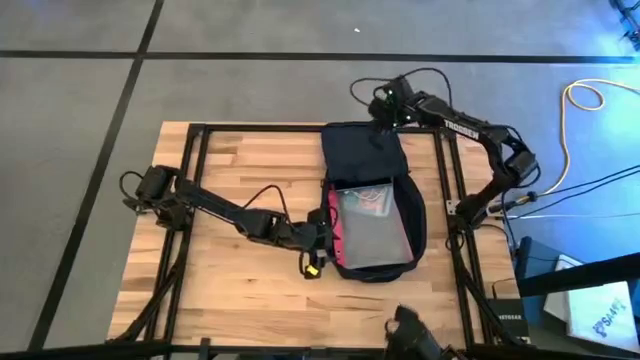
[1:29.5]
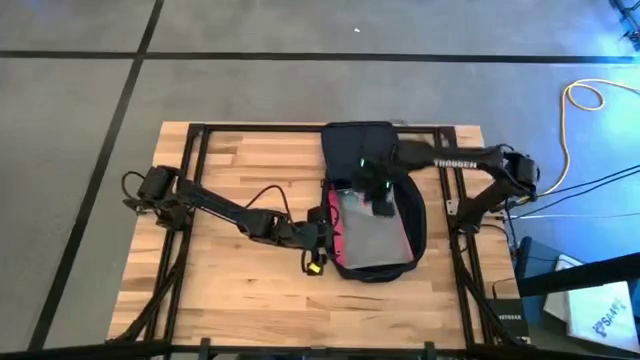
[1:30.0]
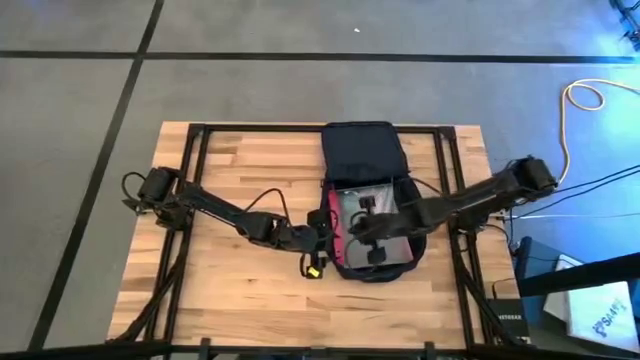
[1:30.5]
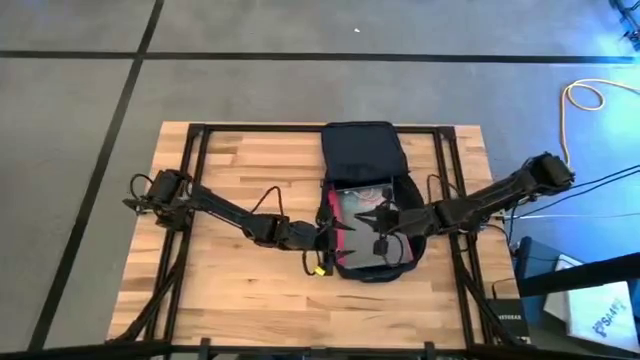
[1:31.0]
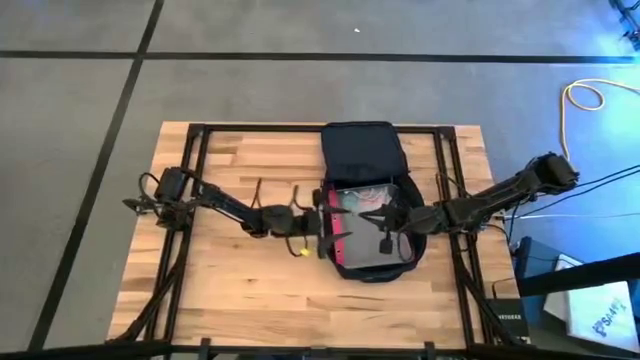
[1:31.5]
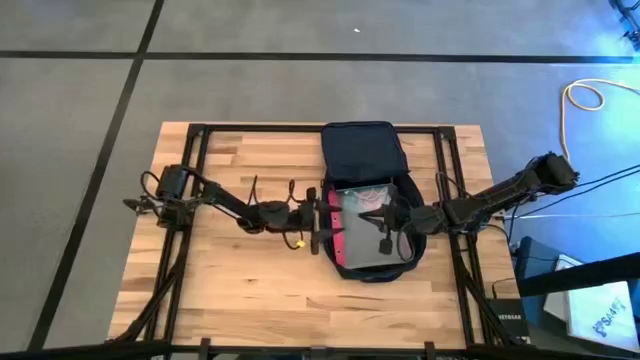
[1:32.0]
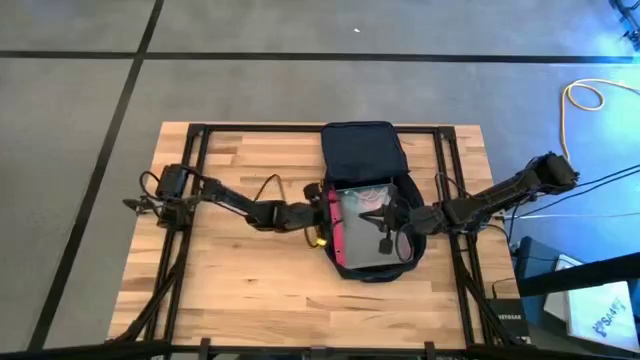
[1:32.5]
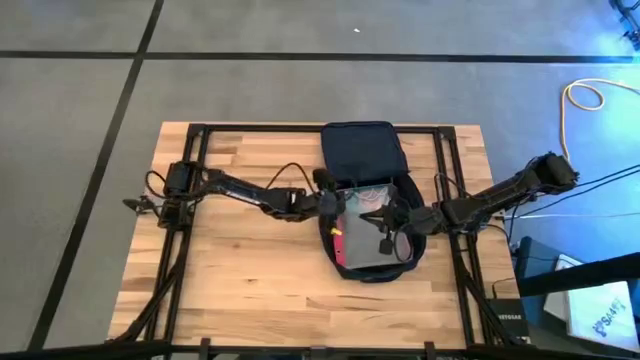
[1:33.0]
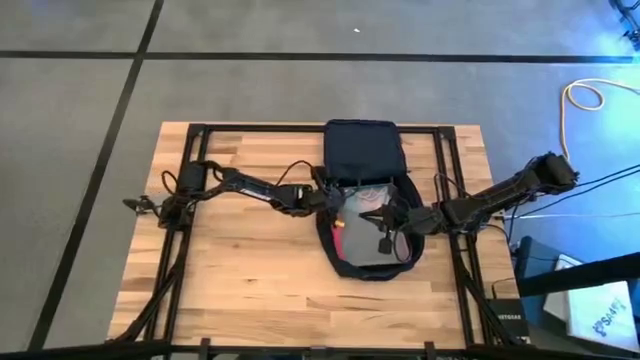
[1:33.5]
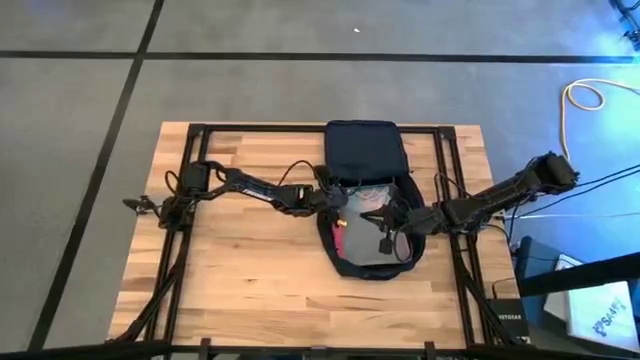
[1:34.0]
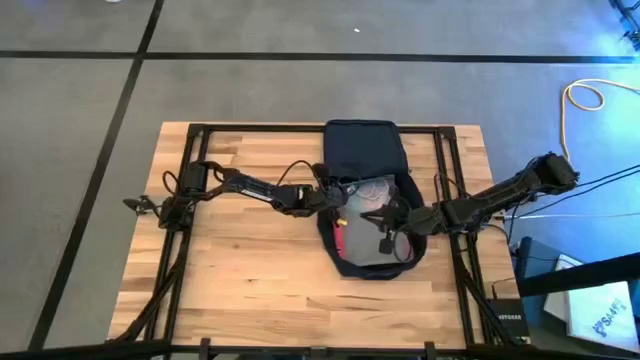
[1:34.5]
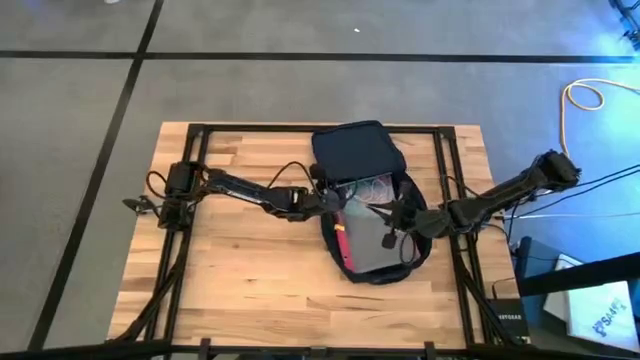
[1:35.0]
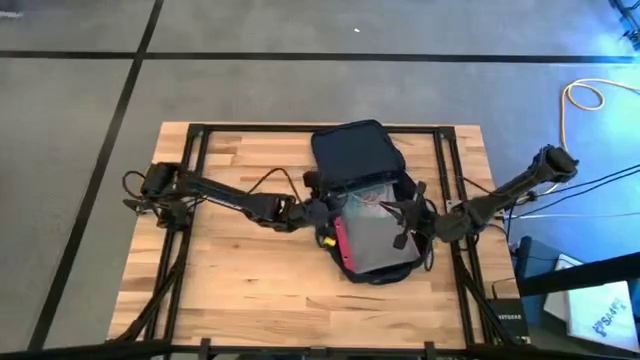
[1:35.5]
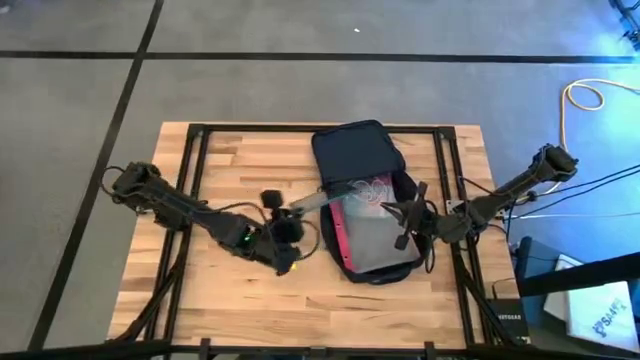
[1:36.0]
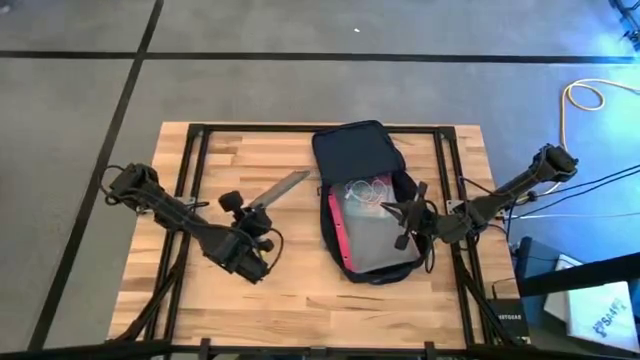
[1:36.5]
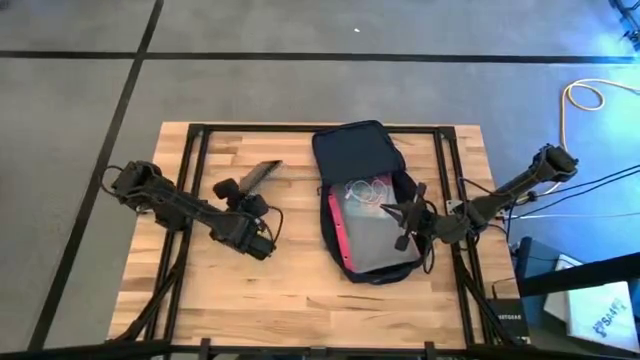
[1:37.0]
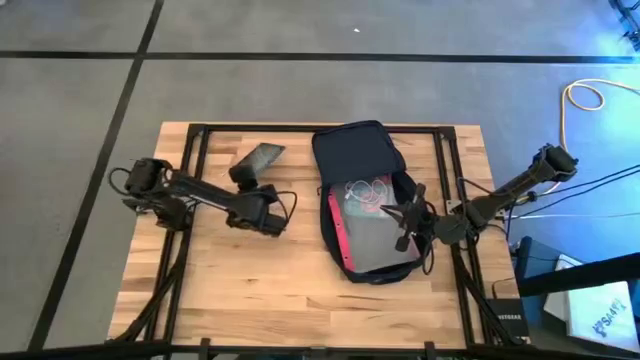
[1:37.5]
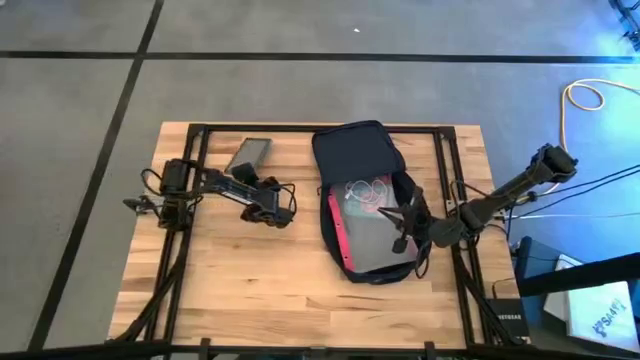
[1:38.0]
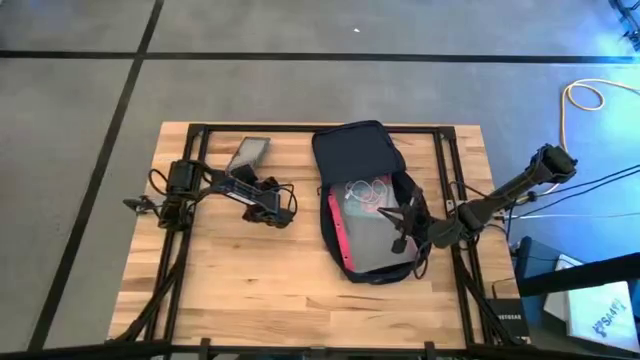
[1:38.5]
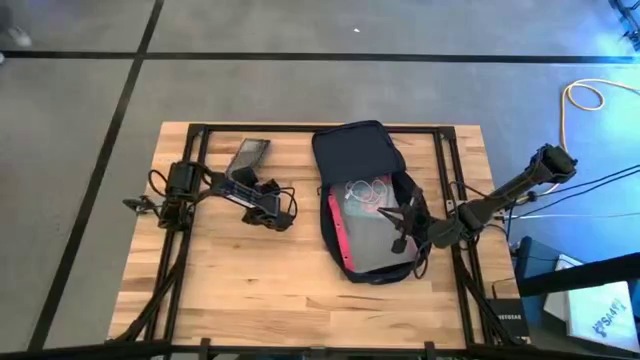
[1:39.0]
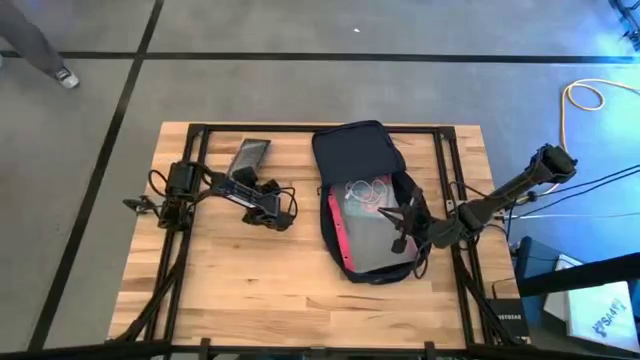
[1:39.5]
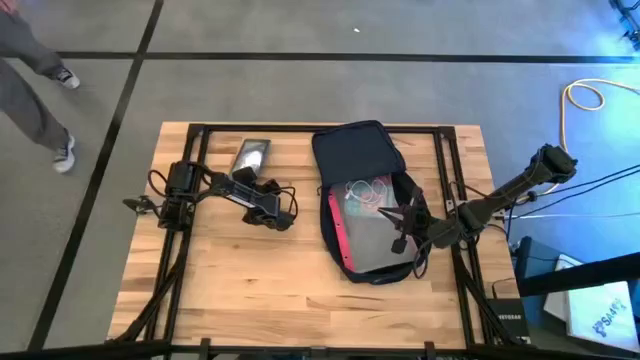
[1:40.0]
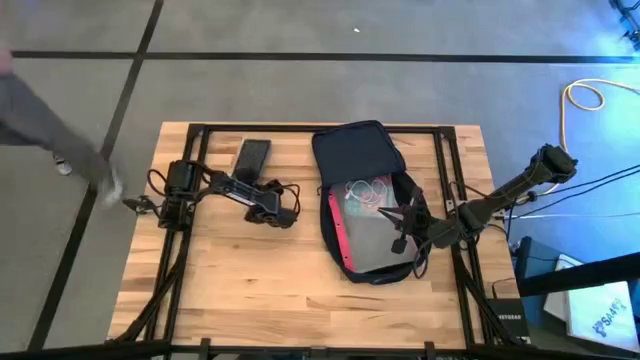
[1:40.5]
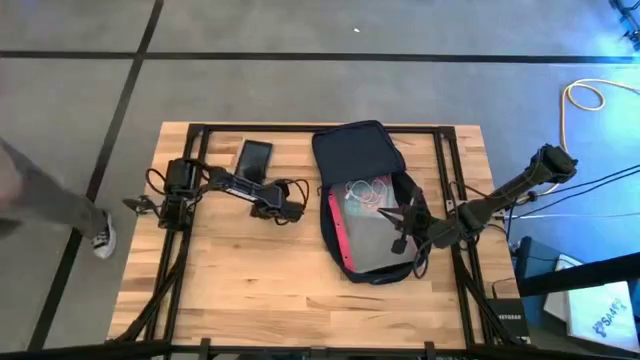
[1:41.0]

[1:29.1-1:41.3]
Task: Unpack backpack
Remove the blue tablet from the blue backpack

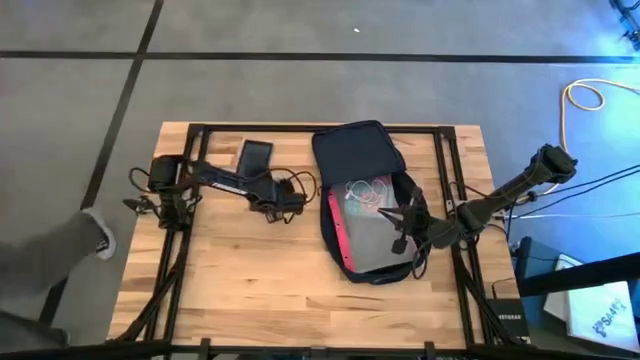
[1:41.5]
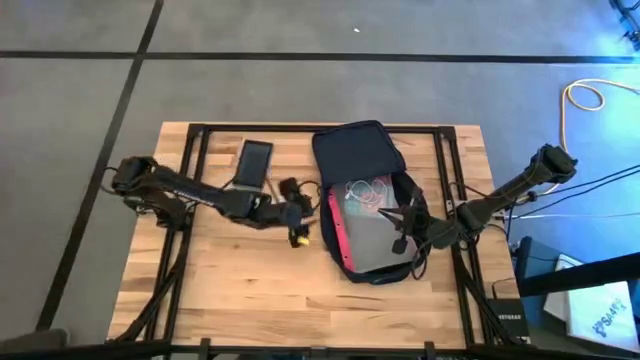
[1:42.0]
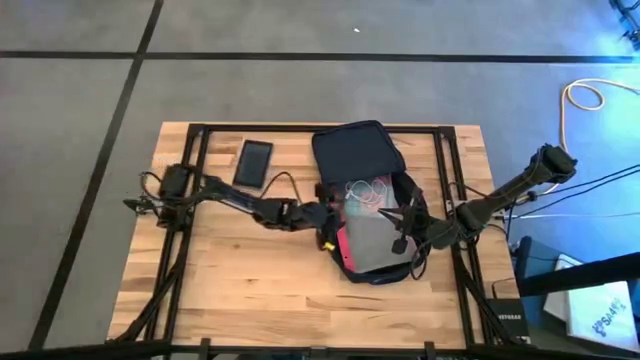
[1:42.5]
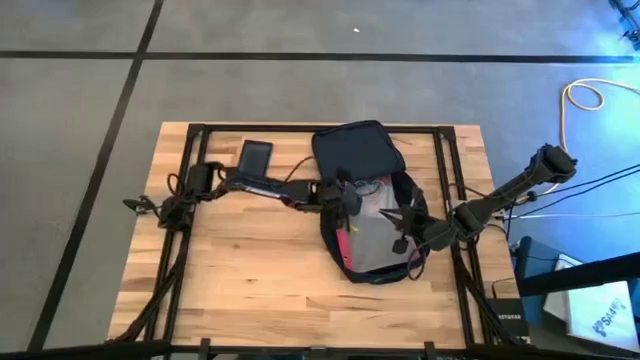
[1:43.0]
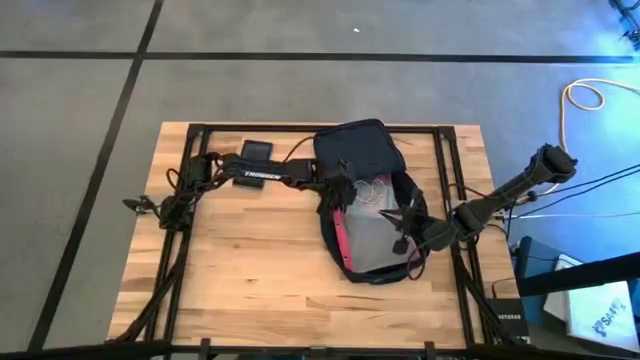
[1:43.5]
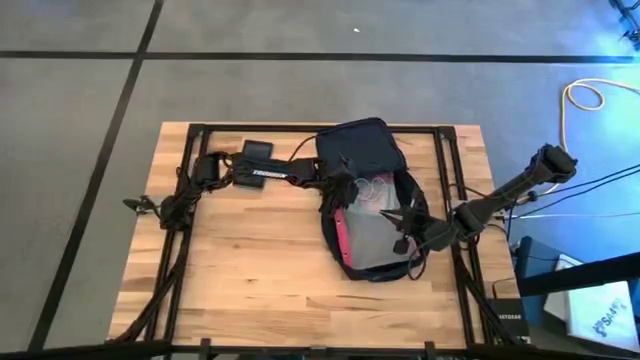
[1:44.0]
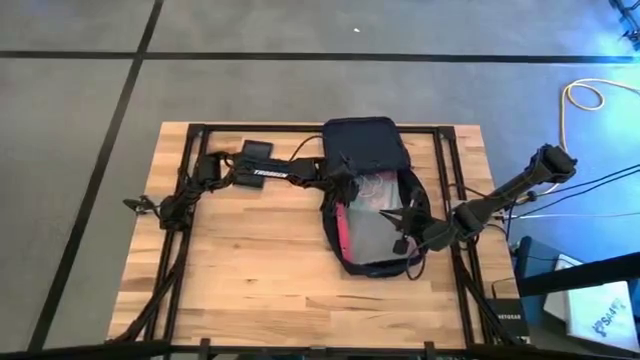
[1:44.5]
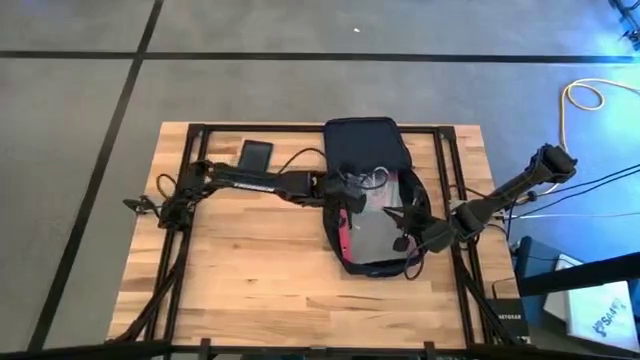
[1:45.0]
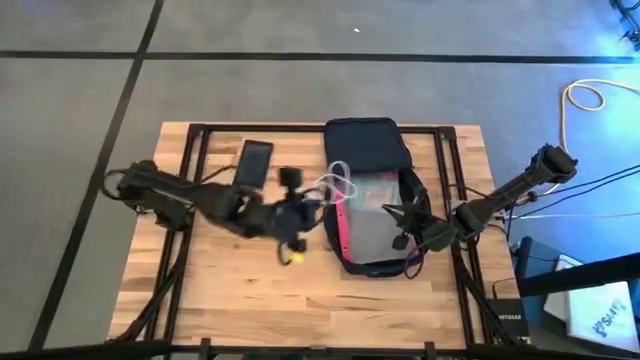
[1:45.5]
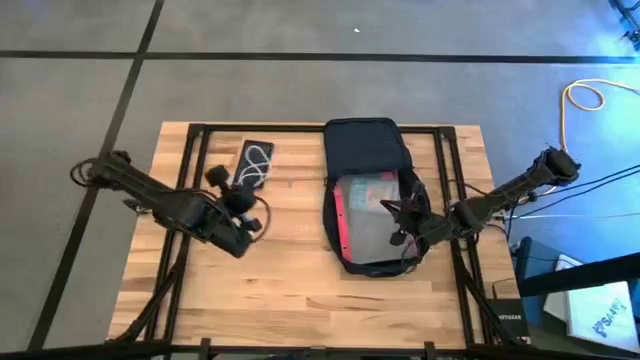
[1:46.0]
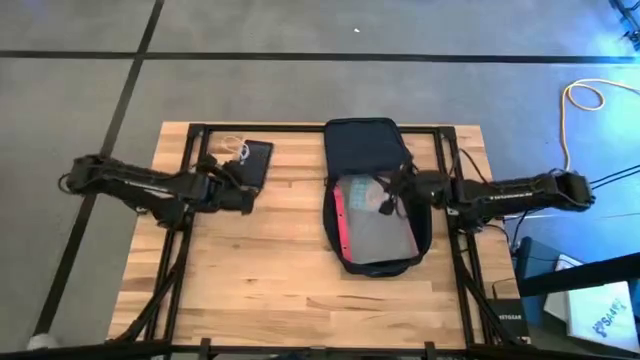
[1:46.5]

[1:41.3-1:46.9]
Remove the white charger cable from the blue backpack

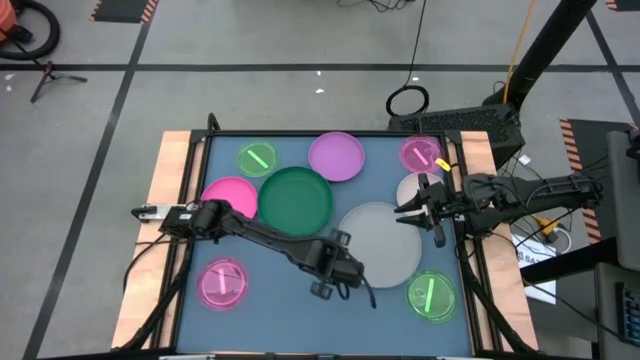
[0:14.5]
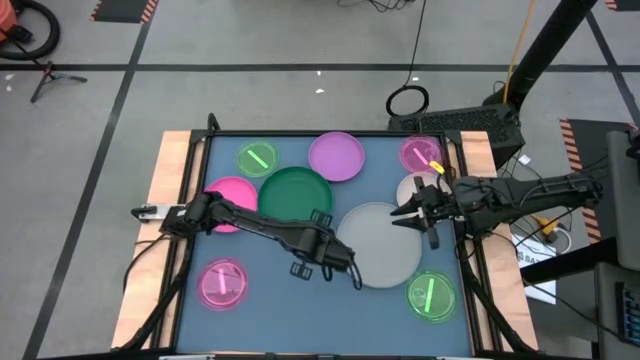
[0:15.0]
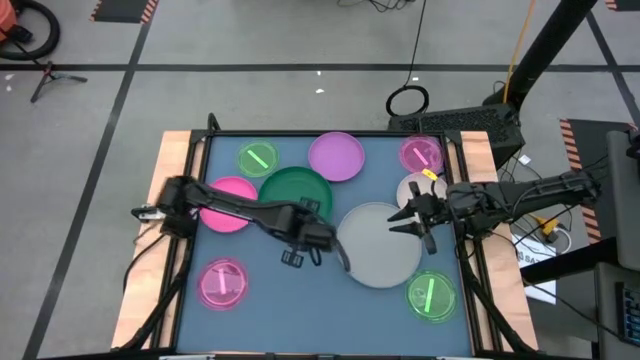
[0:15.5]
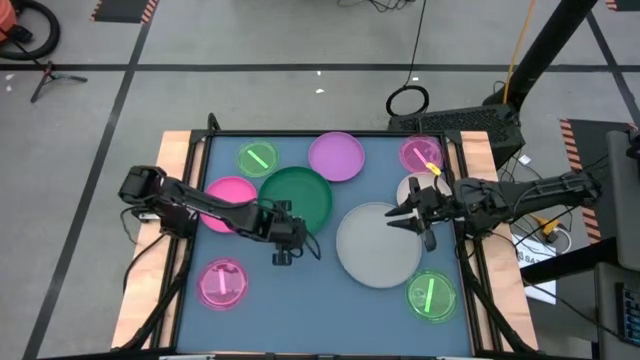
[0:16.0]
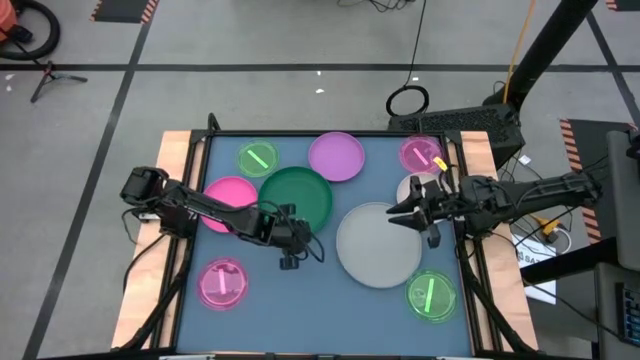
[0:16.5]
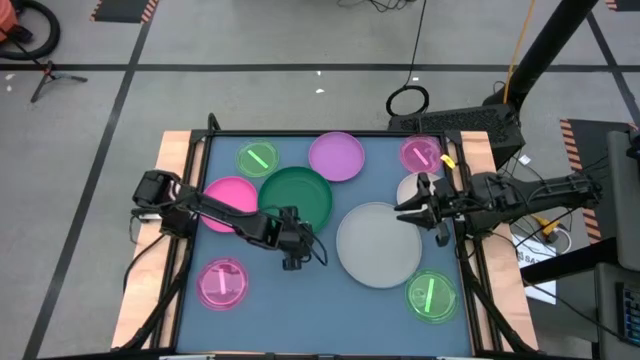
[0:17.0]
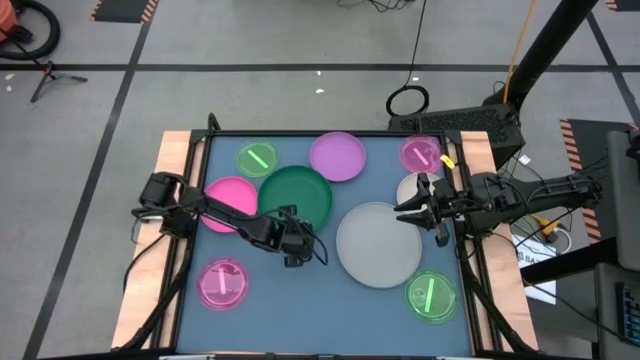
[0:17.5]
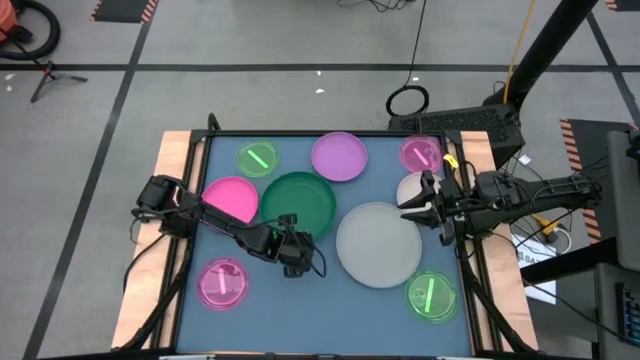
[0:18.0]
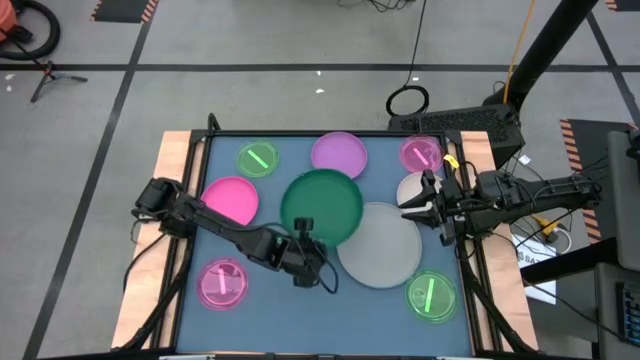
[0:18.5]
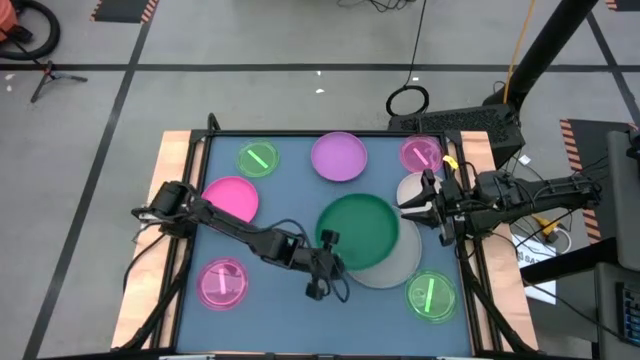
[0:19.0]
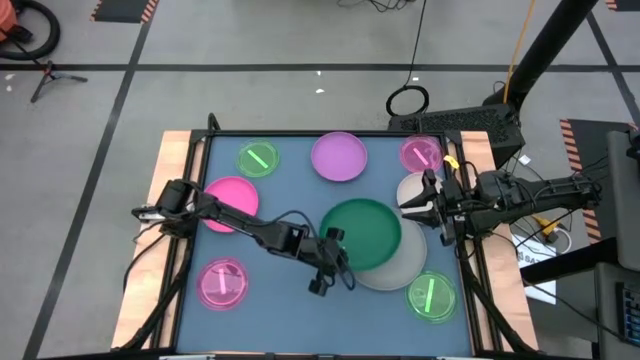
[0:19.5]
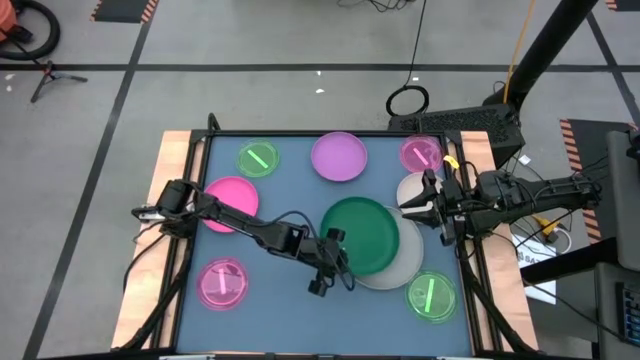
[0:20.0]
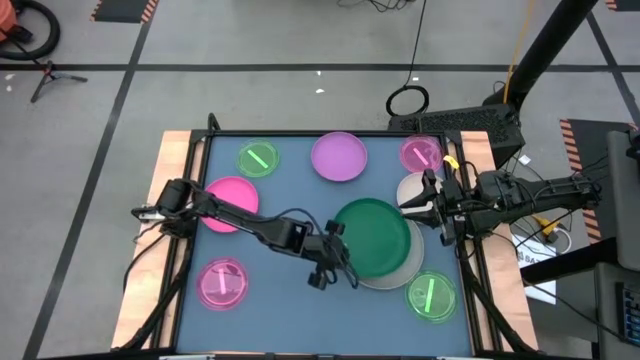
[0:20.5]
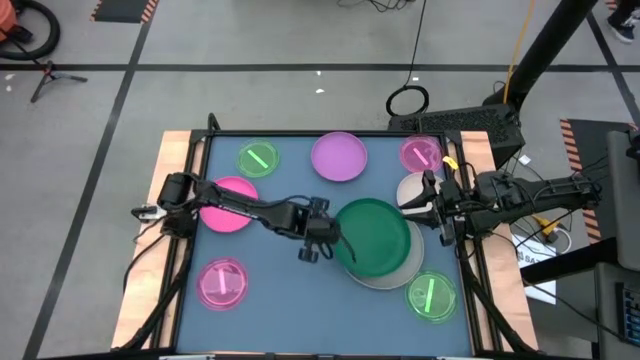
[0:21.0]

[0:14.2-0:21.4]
Task: Stack plastic plates
Stack the dark green plate on top of the gray plate
